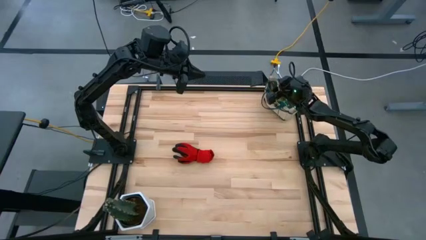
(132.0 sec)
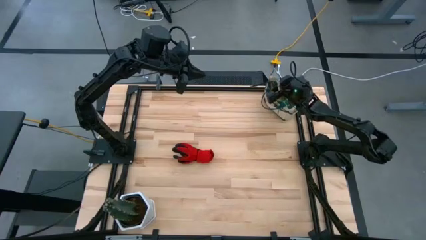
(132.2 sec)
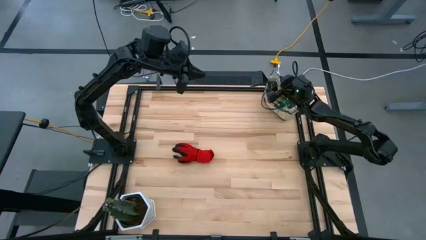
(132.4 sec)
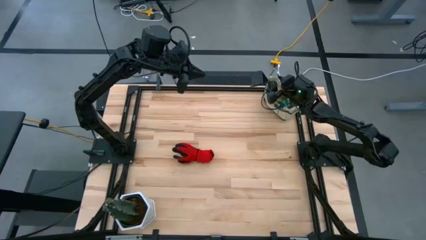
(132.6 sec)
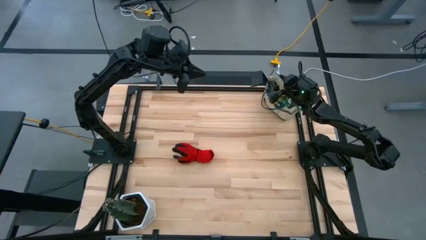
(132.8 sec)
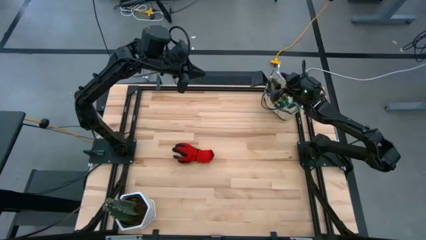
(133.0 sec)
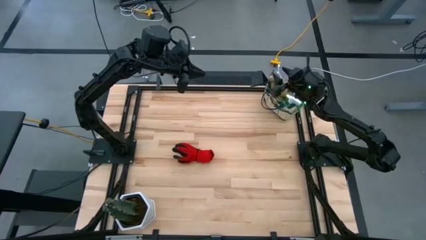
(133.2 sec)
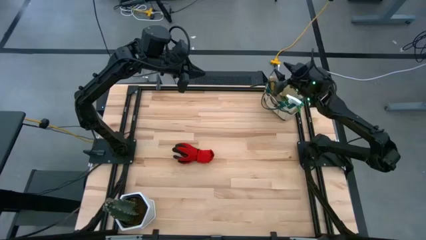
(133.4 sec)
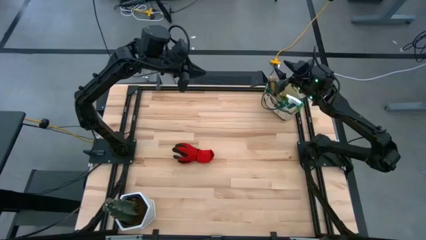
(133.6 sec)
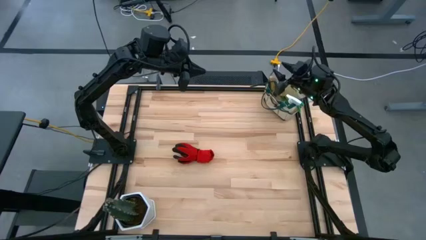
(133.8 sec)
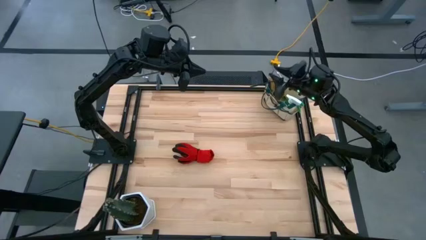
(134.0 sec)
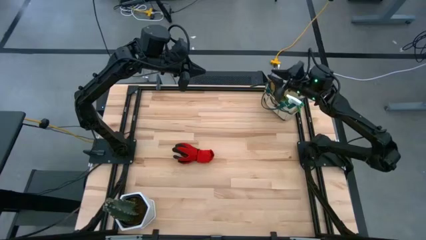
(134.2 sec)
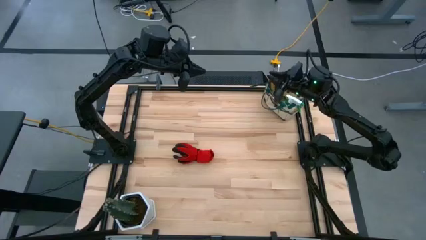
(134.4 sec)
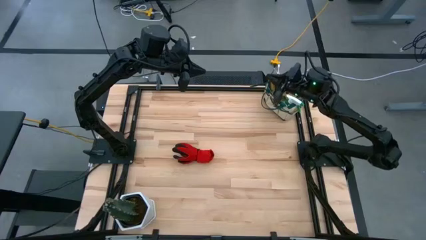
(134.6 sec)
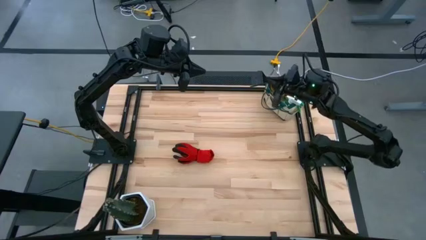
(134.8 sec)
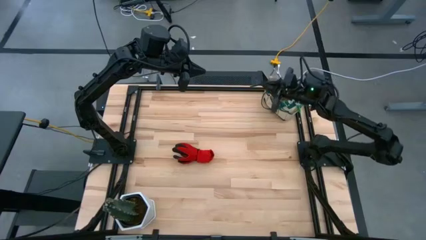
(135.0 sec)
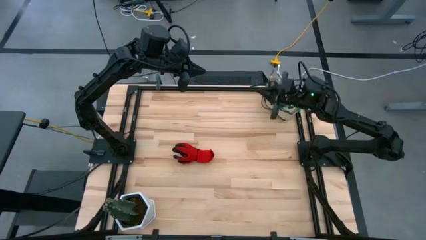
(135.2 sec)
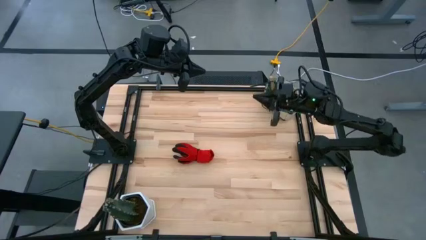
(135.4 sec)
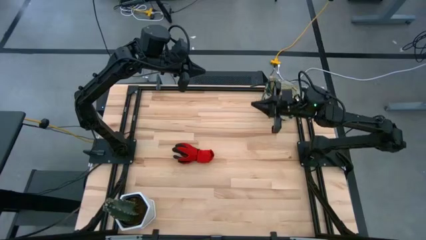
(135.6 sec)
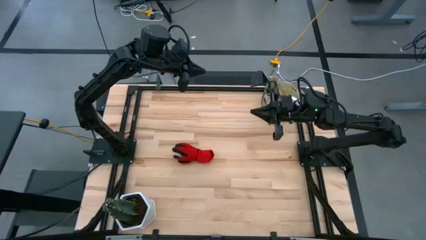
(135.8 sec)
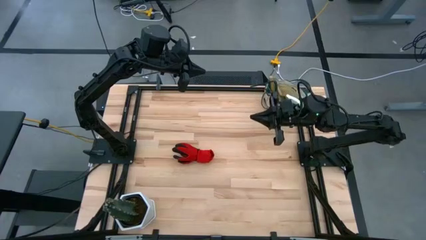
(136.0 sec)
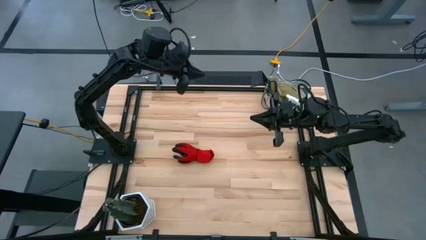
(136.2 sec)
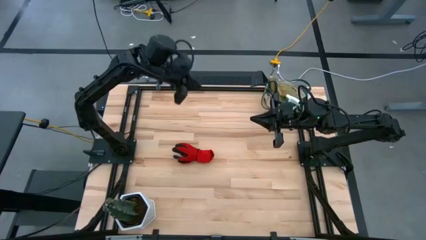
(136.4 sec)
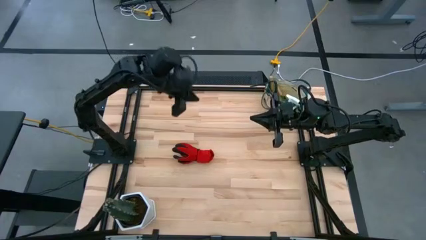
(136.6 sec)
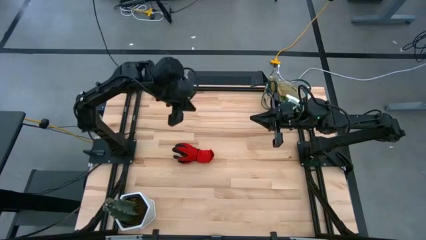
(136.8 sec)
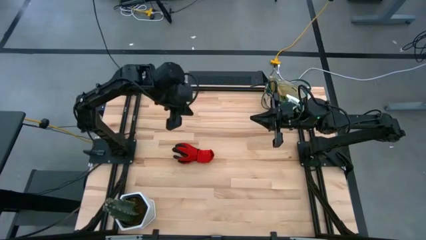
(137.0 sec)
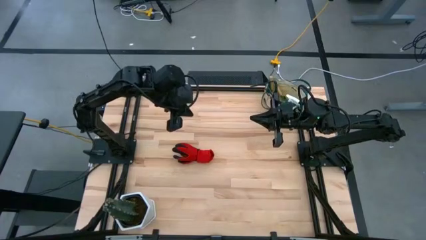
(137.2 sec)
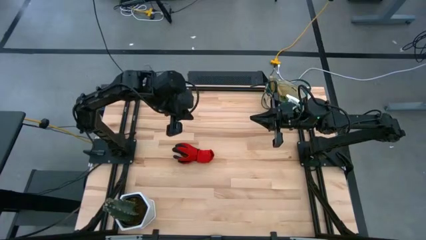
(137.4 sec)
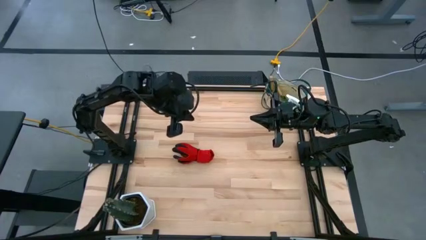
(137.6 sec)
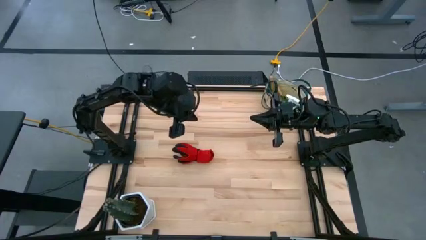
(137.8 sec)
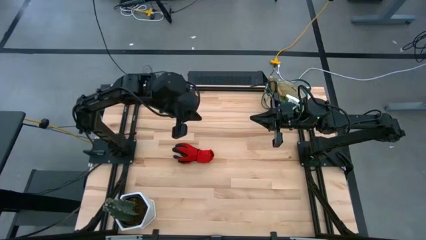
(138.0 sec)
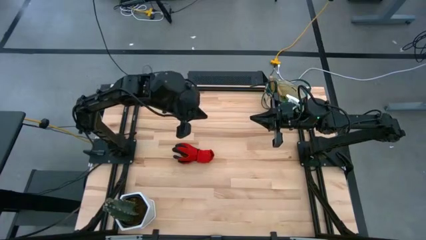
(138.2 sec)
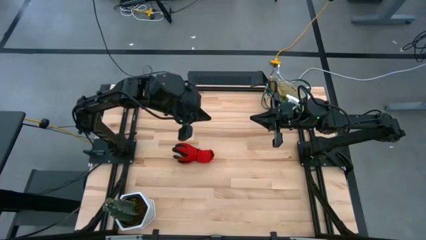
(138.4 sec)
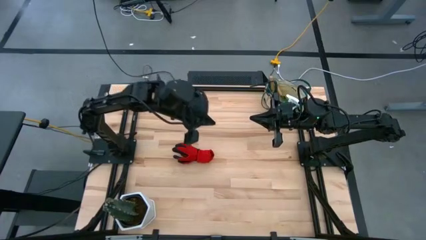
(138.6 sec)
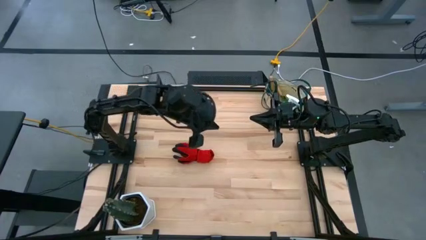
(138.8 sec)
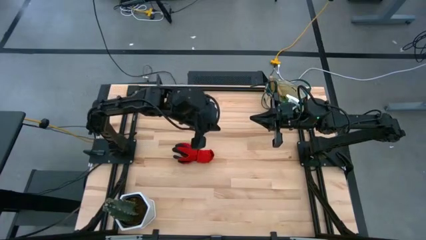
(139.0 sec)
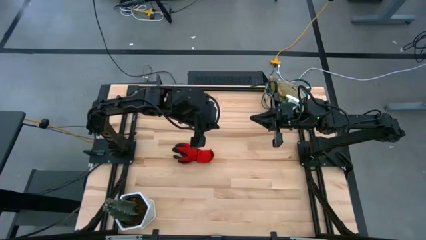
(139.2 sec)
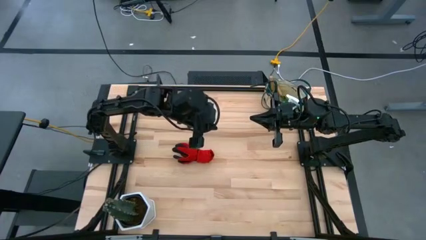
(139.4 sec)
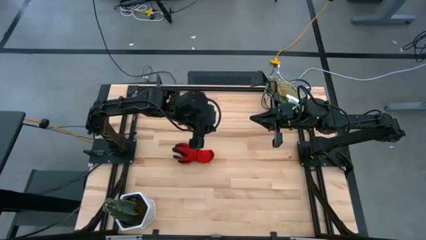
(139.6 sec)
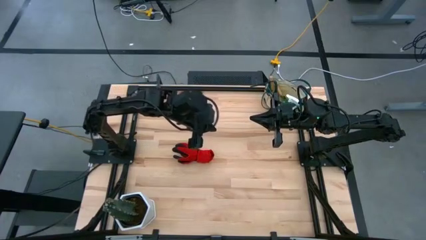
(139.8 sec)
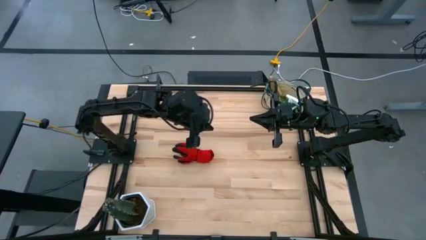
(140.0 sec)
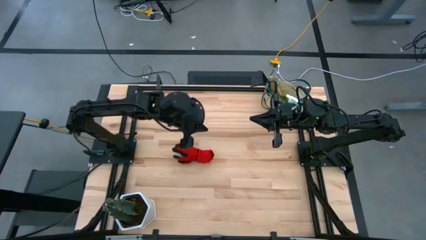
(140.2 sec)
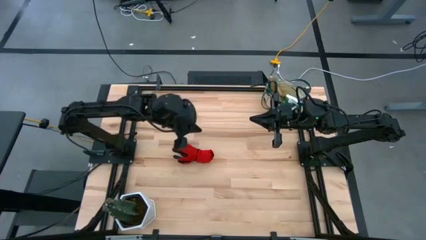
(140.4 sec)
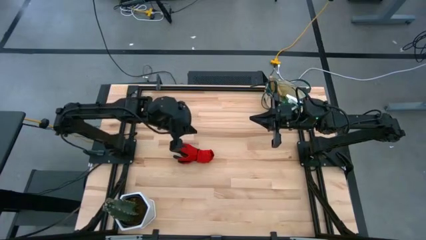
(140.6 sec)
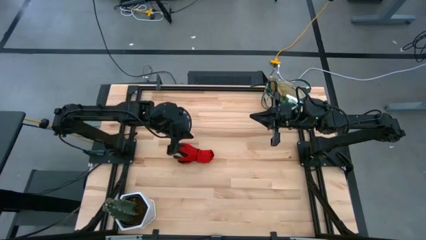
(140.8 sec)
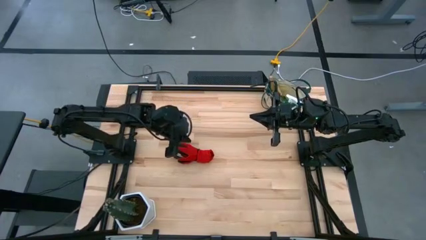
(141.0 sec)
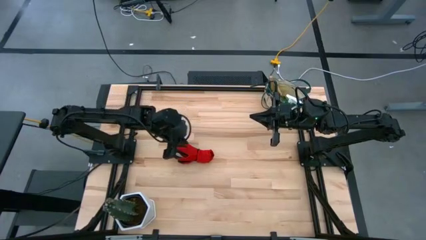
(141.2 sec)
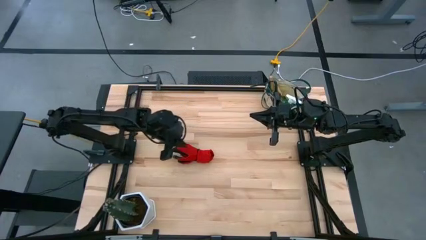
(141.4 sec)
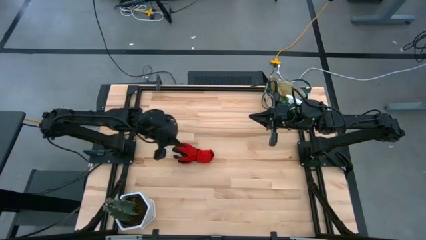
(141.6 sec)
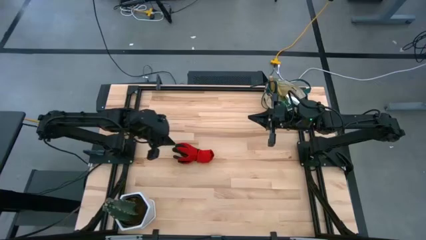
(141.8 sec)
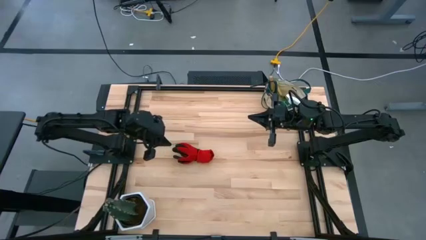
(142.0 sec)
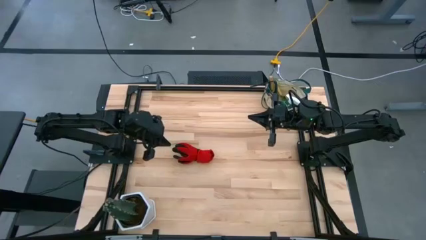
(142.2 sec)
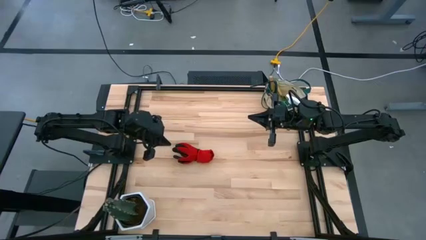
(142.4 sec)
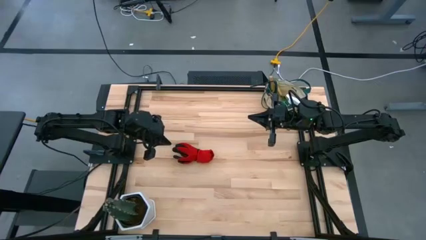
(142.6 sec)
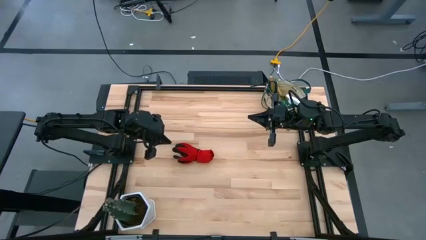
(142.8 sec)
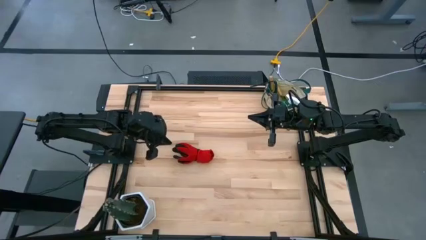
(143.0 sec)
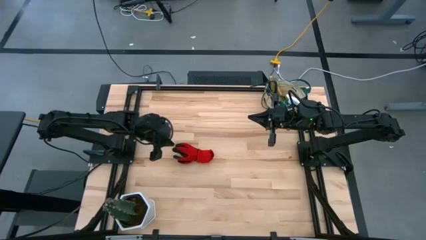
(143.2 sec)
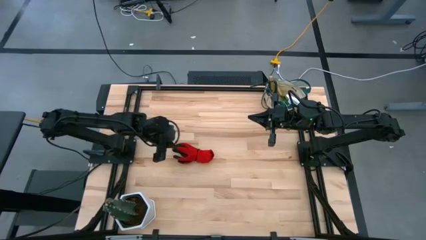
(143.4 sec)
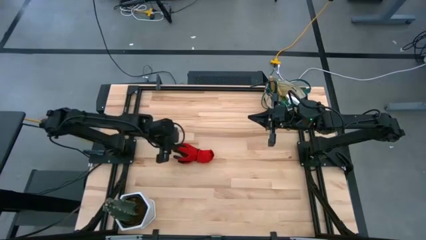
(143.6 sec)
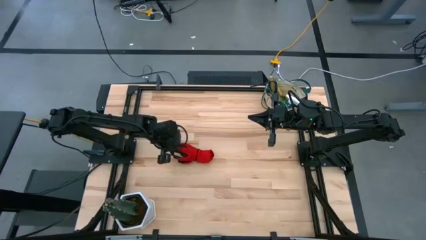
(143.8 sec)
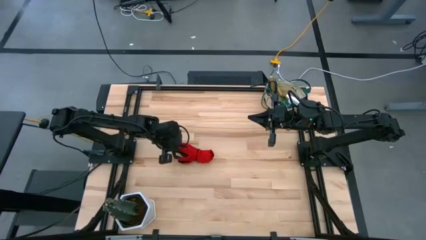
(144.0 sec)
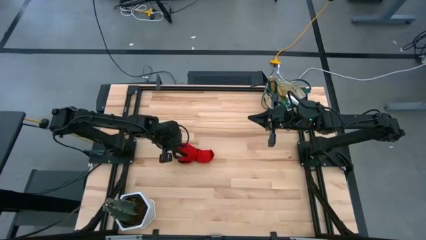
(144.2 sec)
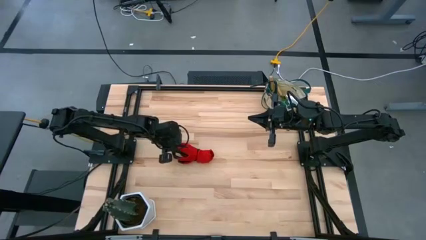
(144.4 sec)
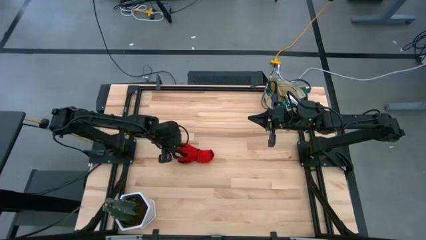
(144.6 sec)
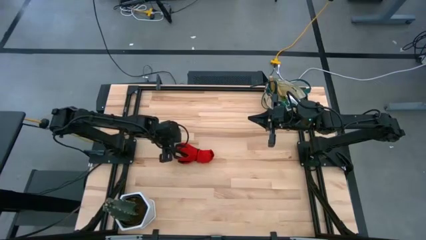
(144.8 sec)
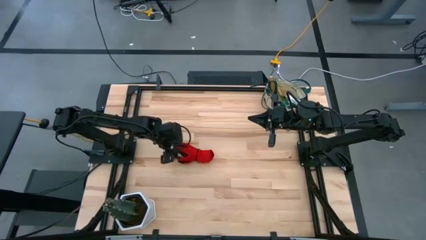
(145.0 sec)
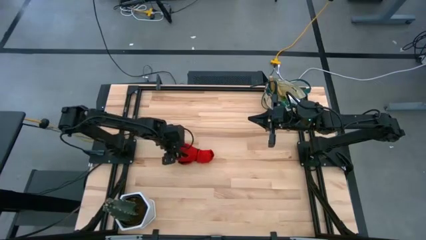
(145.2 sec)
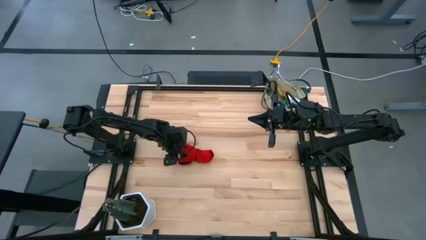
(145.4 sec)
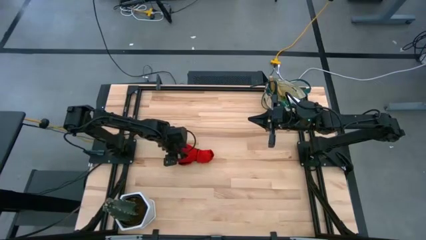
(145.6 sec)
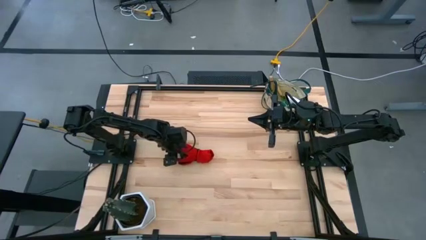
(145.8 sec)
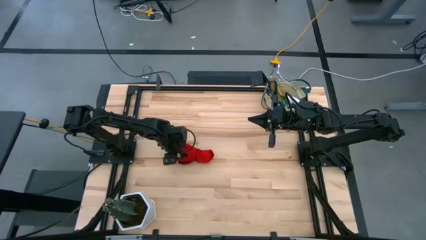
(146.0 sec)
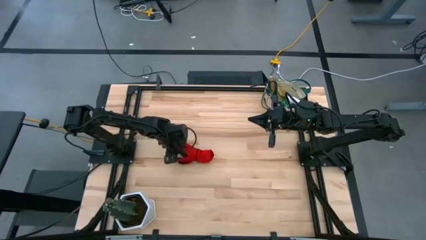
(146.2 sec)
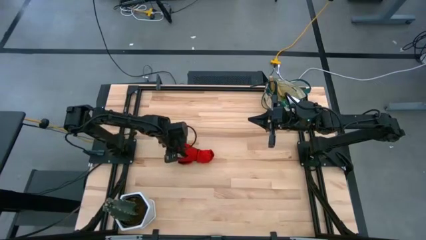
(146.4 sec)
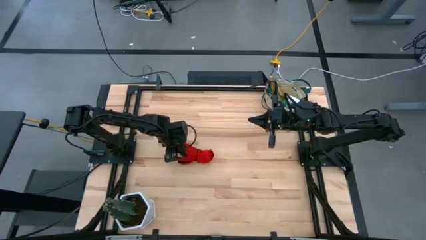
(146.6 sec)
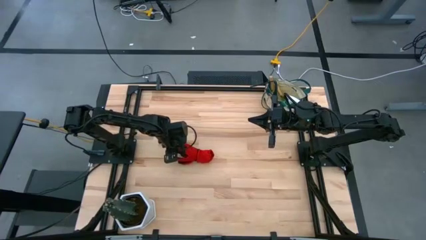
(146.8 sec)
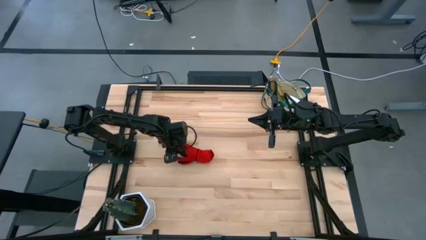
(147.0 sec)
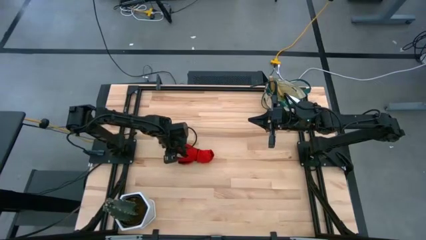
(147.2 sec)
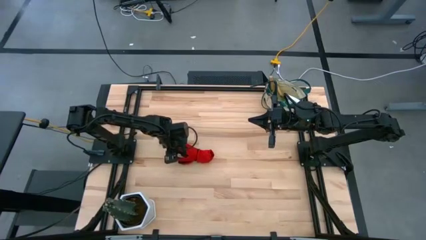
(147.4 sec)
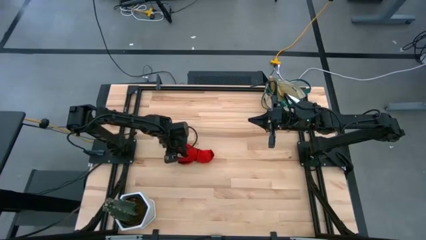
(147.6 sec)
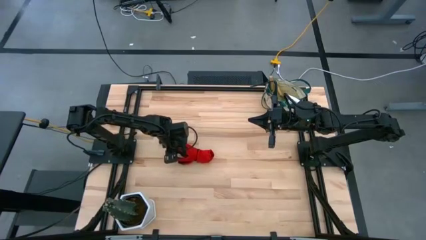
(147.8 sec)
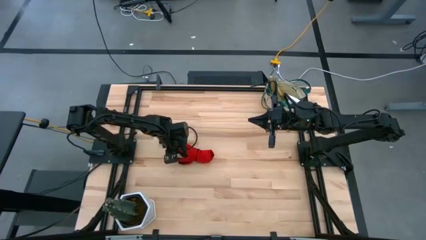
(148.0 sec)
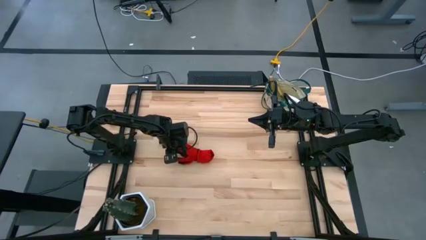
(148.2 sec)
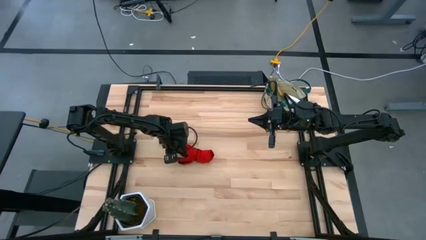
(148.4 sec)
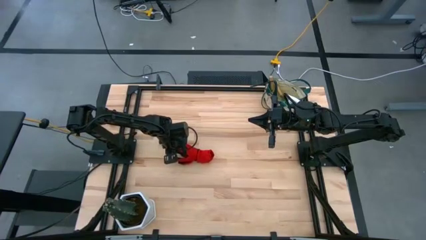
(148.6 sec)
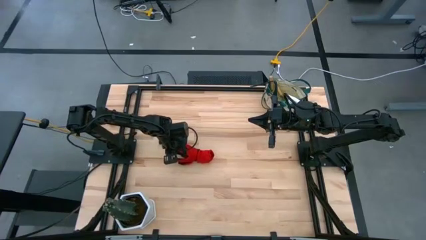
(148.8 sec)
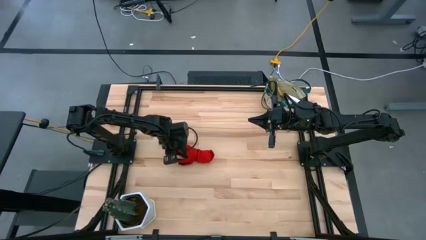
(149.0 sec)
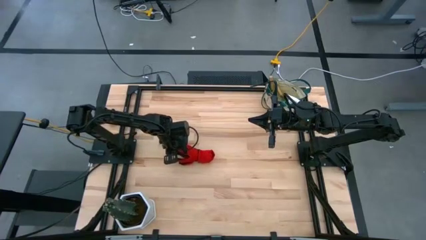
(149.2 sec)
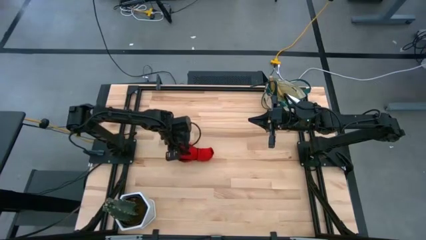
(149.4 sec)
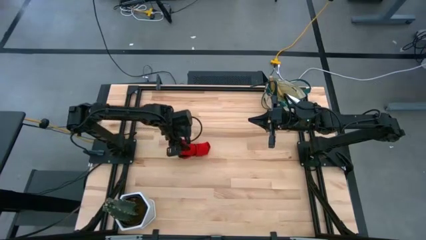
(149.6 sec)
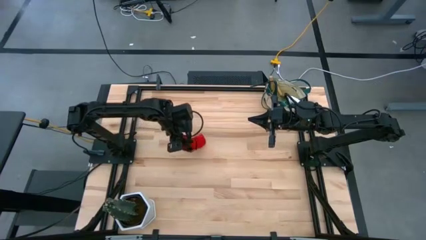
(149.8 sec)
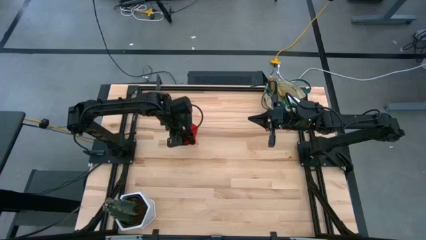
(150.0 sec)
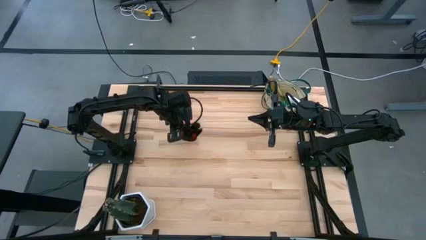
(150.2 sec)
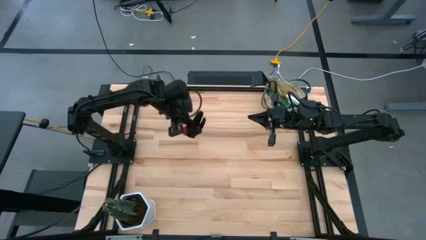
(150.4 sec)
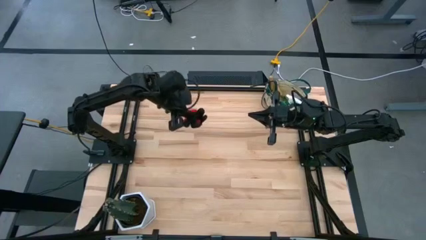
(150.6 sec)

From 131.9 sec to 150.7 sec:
Task: Pick & Place Garden tools in Gardening bag
Put the red gloves scissors into the gardening bag
